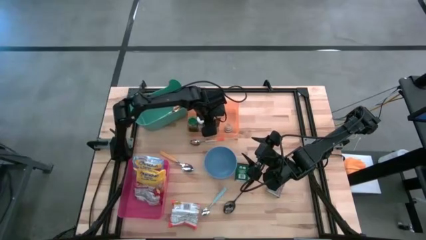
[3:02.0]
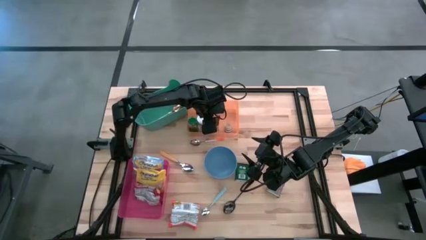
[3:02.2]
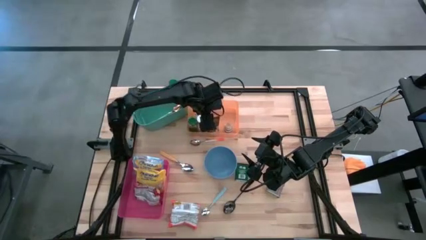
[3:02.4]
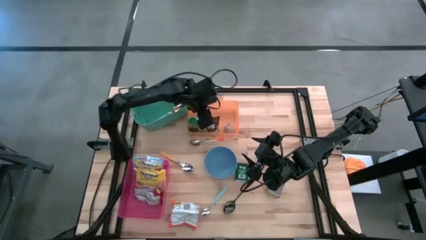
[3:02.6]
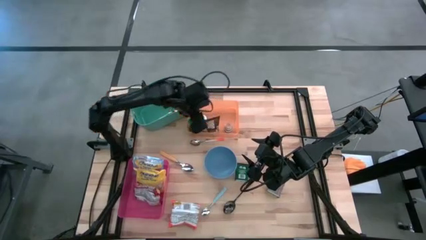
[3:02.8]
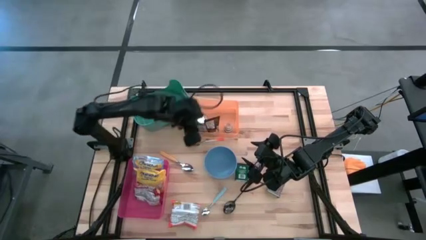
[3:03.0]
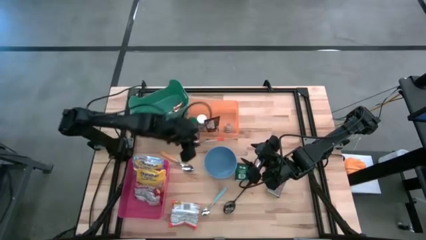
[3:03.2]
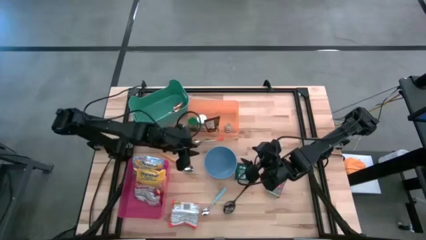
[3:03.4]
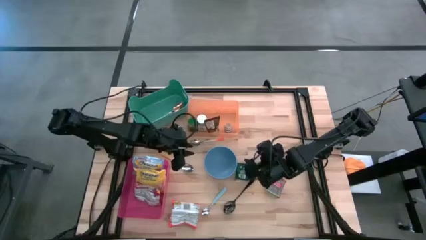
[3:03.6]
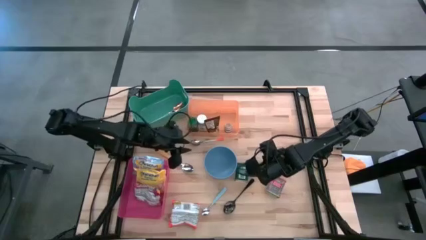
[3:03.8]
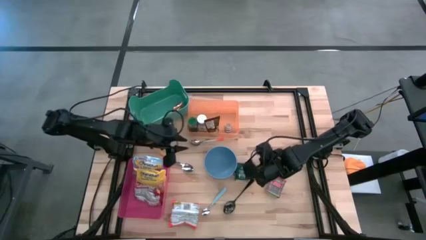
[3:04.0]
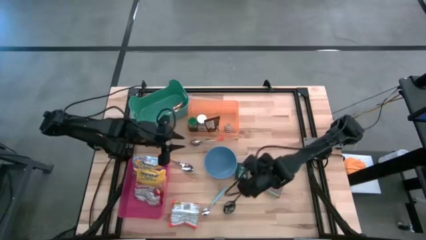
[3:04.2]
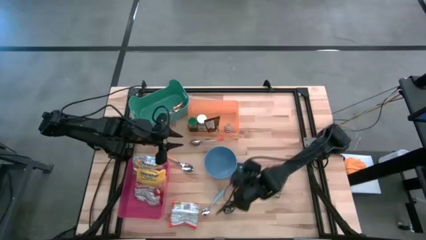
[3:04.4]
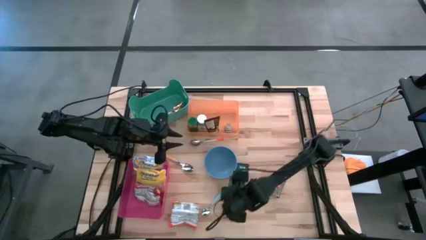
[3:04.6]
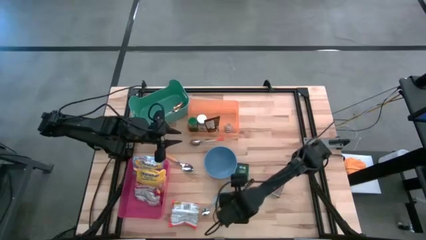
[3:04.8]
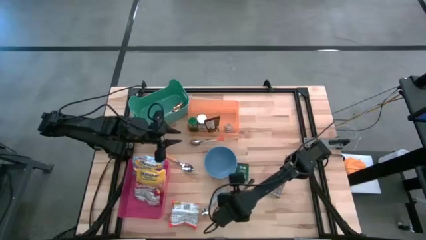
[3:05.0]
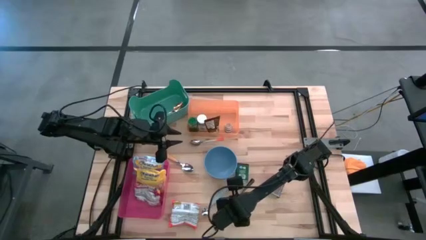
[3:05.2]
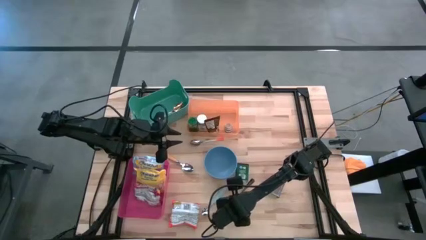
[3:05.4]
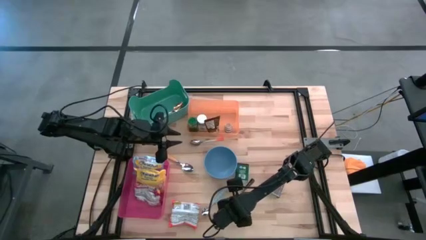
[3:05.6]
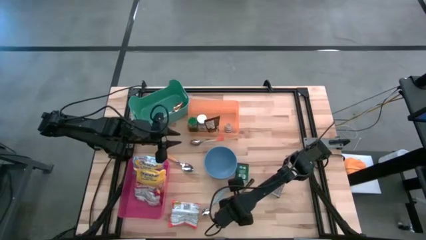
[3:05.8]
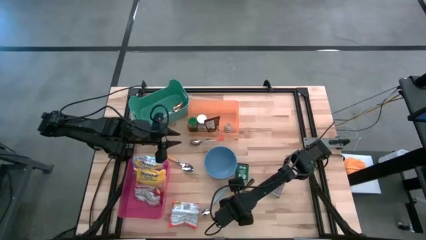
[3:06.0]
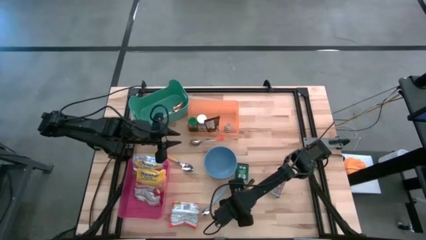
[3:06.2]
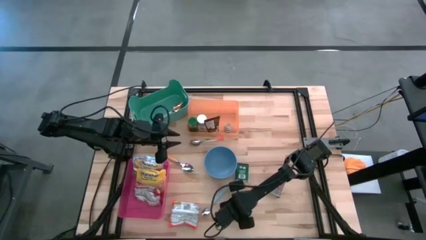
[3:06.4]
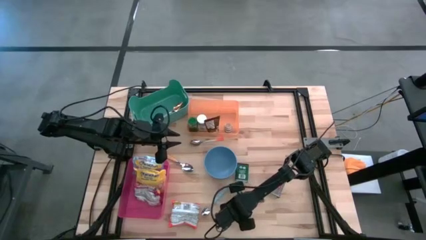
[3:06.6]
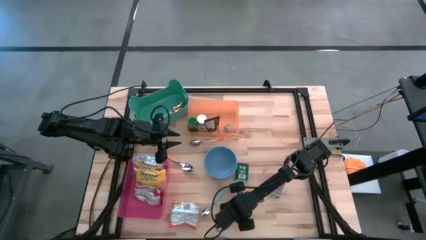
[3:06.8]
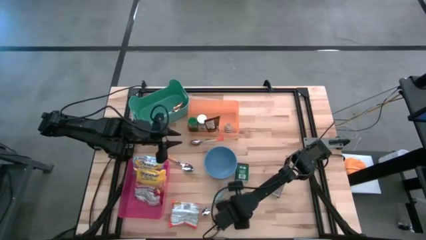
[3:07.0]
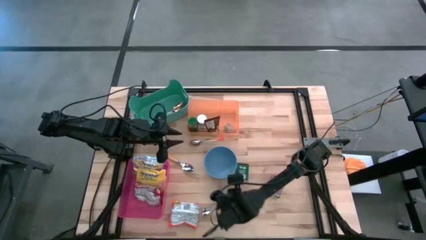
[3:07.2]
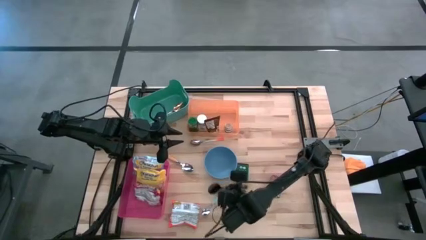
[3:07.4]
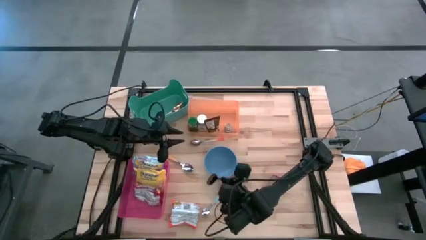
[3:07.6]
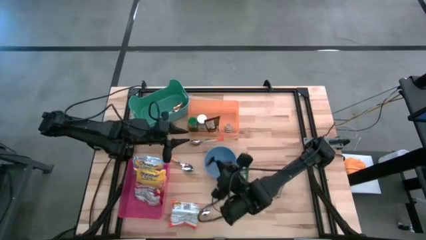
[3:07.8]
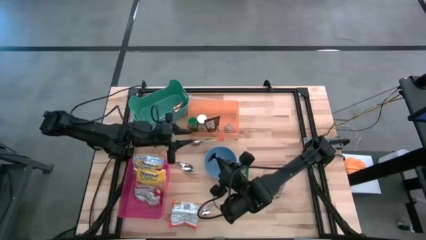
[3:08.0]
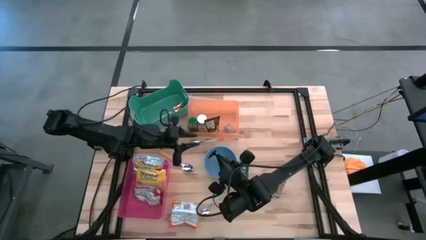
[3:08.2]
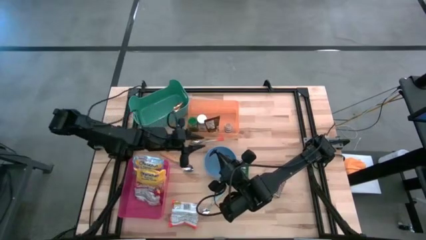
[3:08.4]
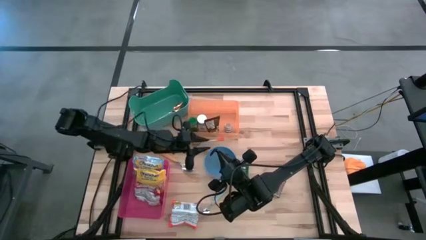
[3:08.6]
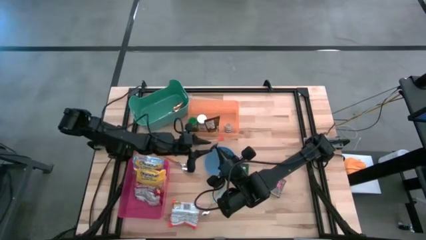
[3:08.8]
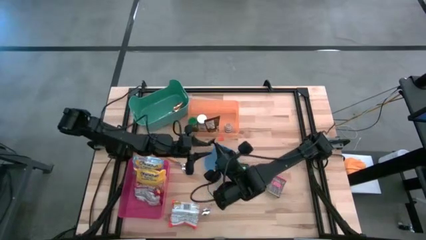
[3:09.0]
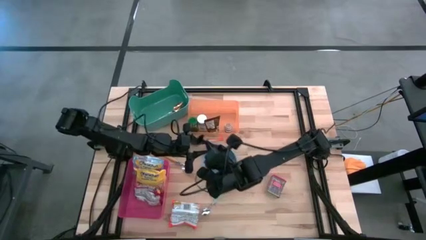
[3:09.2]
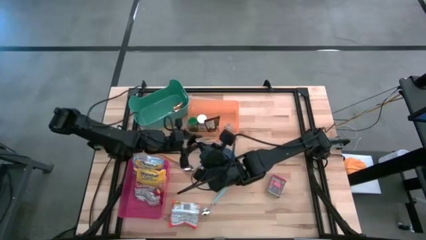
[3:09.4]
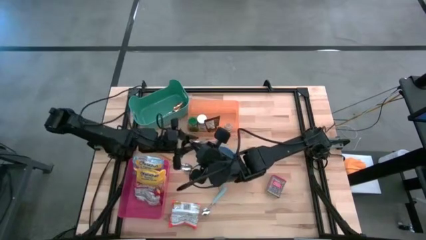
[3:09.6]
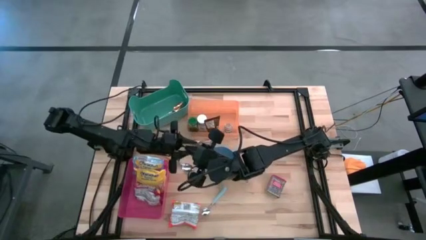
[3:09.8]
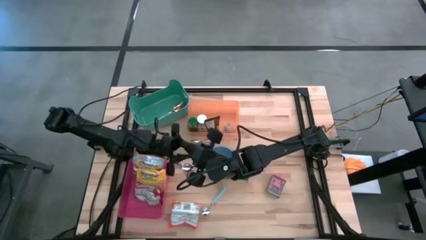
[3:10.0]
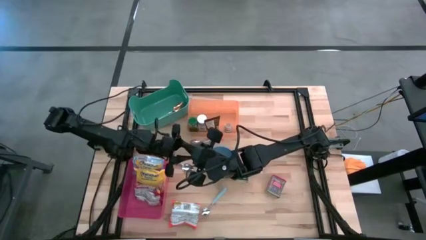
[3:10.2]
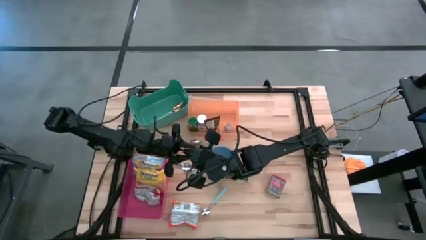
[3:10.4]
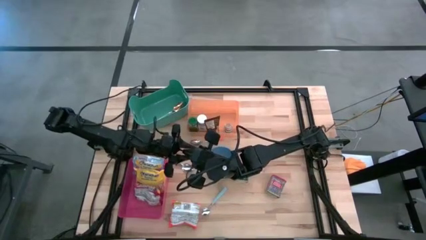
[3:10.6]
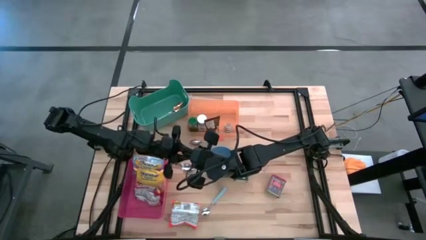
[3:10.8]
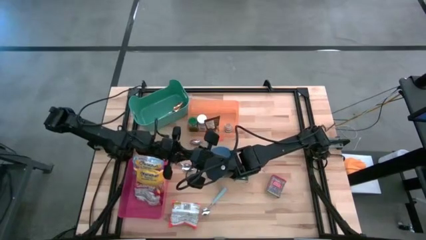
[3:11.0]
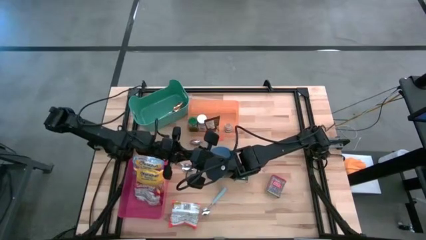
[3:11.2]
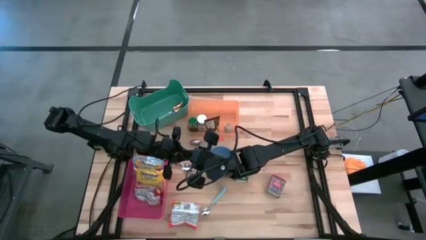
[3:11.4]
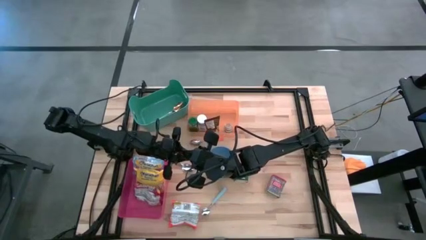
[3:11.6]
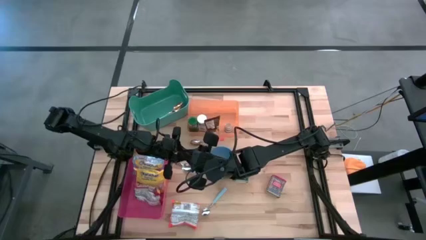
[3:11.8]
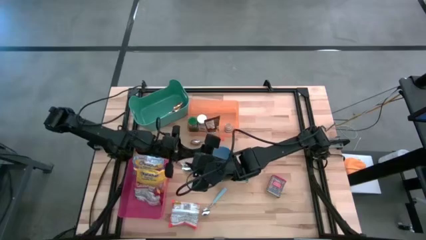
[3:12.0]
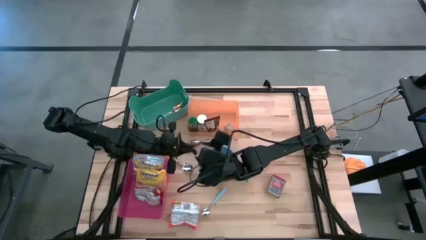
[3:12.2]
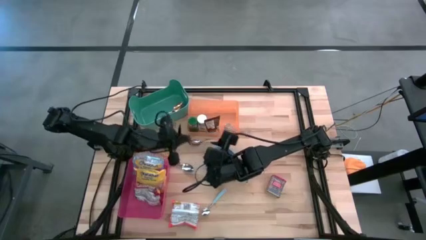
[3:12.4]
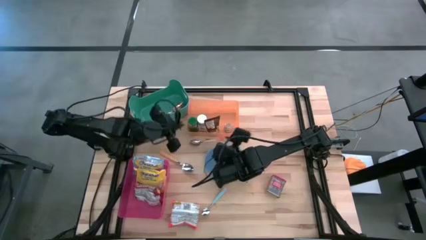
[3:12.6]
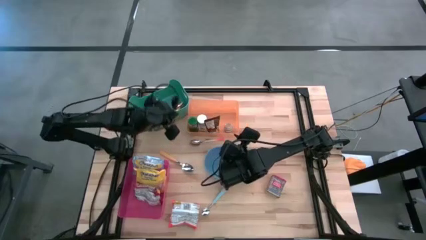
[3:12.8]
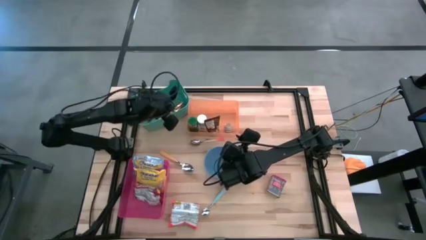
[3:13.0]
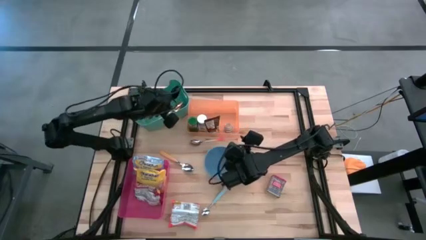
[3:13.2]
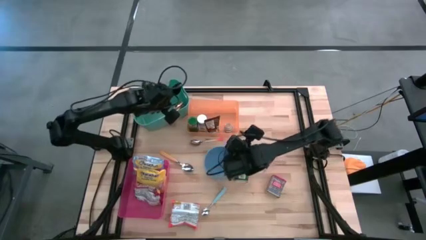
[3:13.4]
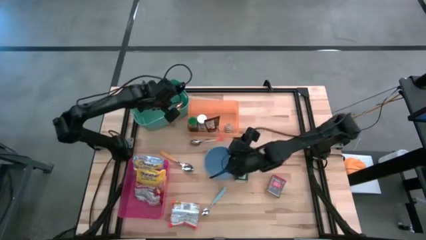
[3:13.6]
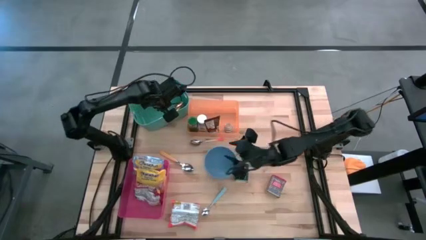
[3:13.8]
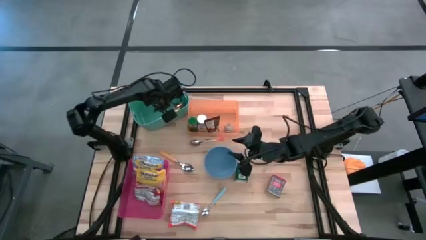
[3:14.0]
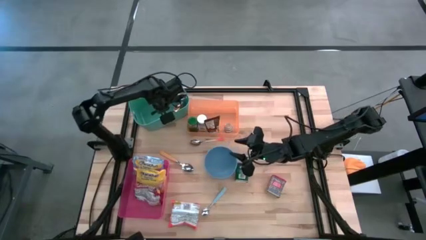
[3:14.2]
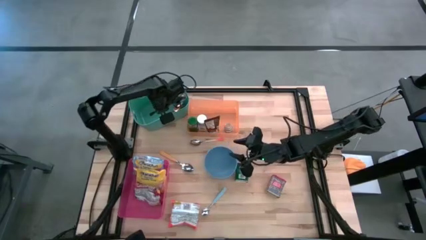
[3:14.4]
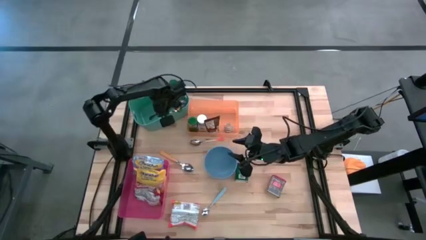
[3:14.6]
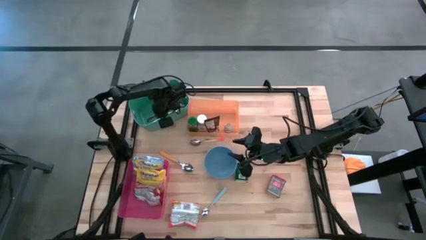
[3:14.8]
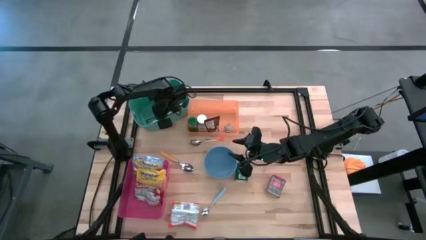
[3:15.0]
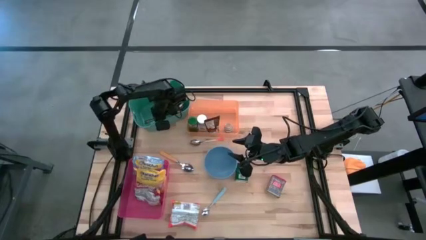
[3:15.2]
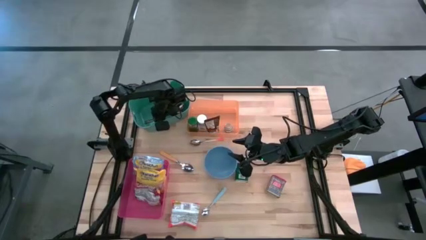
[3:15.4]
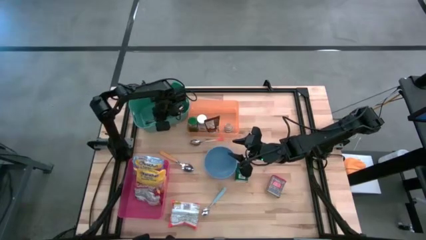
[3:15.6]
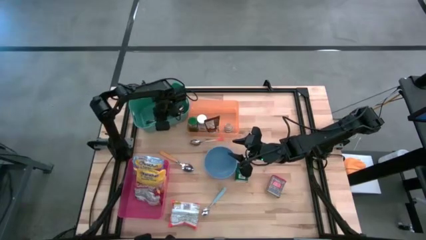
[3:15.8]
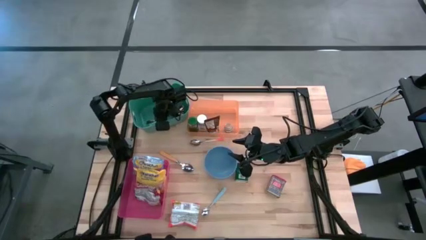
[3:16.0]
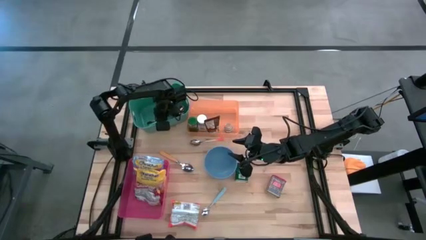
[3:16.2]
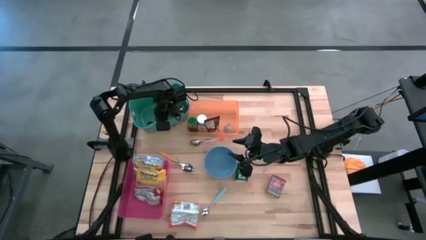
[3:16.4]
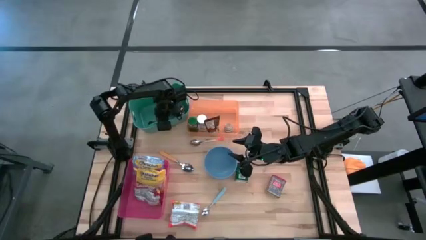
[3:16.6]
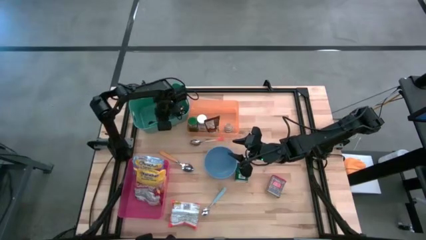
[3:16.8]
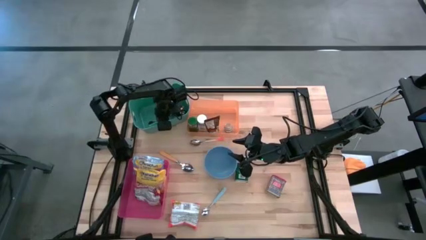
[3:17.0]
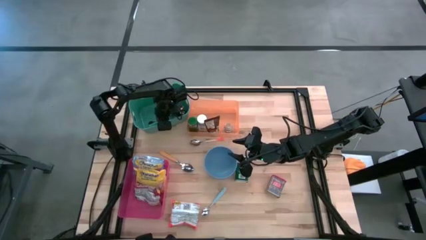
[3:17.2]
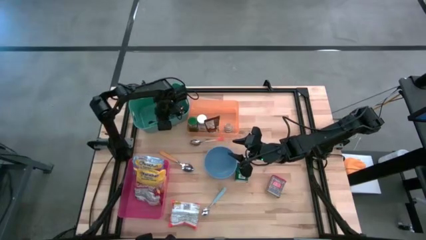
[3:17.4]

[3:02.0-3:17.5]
Put the black spoon into the green bin
